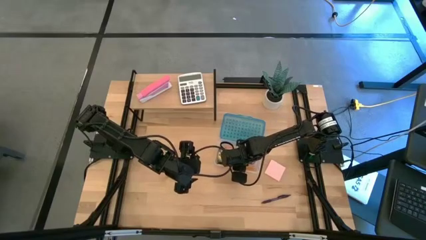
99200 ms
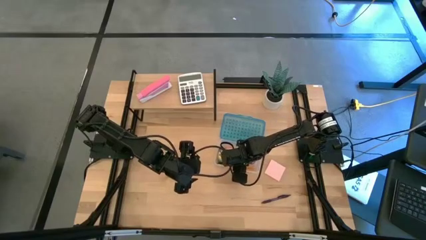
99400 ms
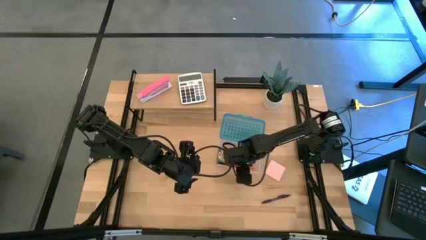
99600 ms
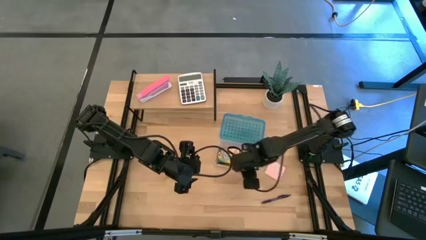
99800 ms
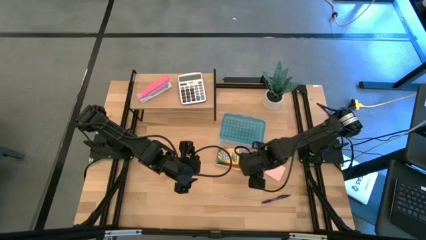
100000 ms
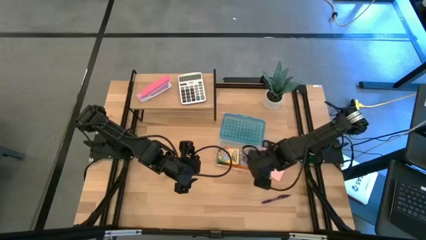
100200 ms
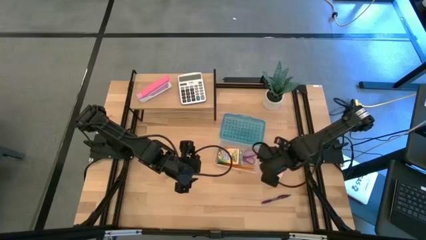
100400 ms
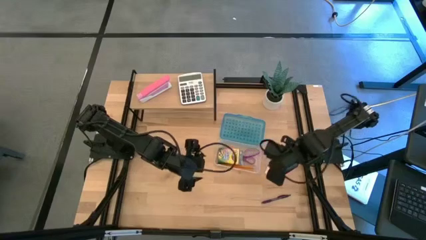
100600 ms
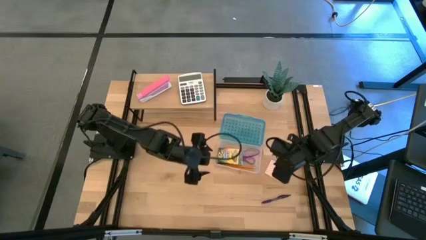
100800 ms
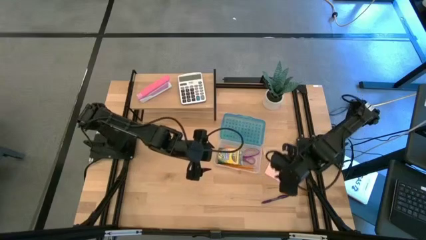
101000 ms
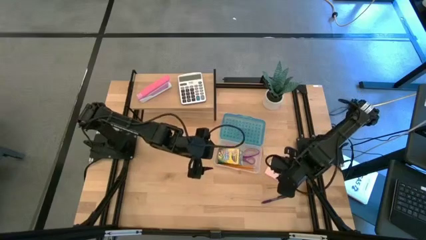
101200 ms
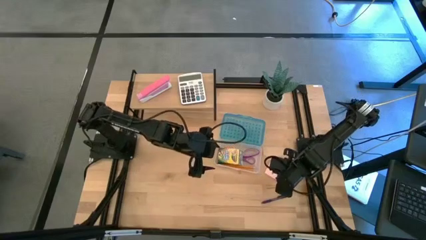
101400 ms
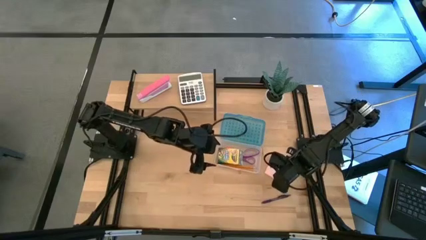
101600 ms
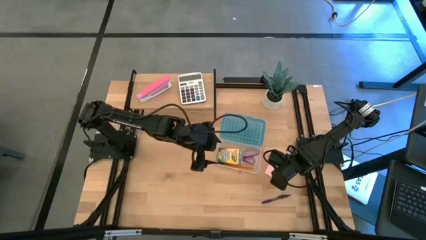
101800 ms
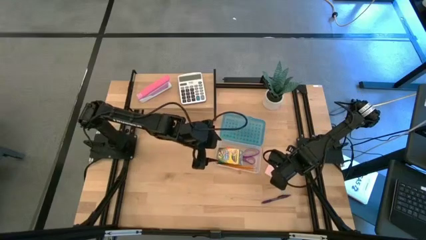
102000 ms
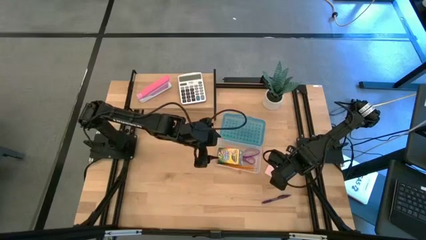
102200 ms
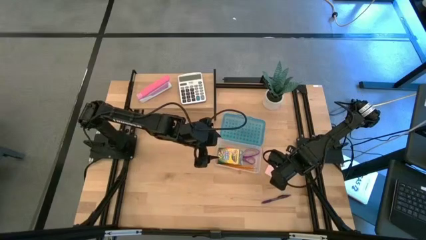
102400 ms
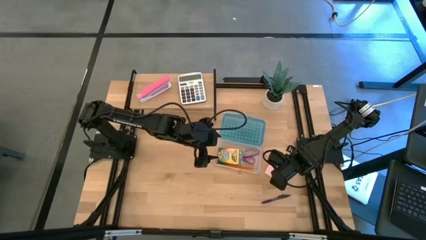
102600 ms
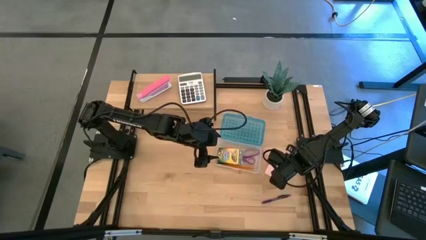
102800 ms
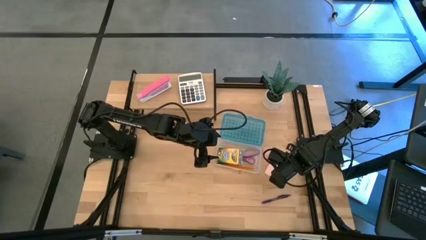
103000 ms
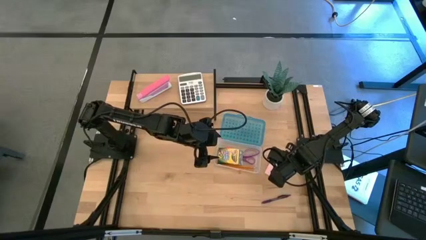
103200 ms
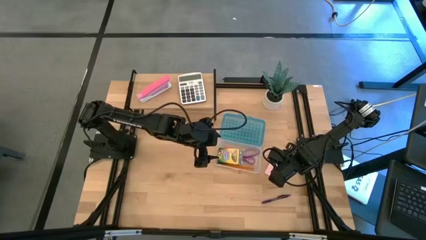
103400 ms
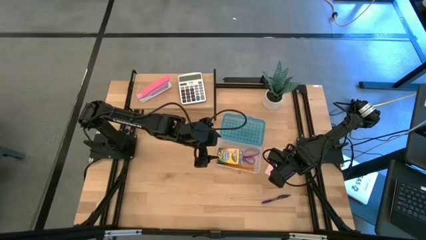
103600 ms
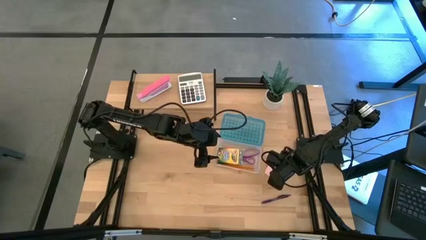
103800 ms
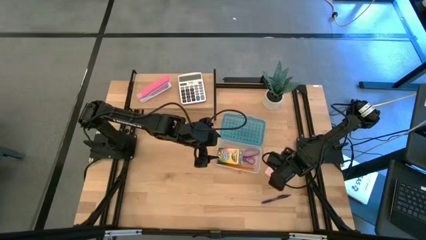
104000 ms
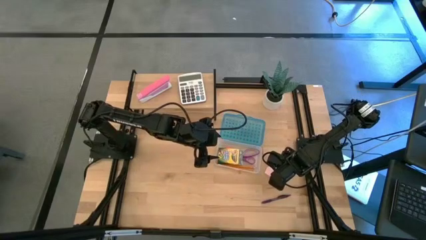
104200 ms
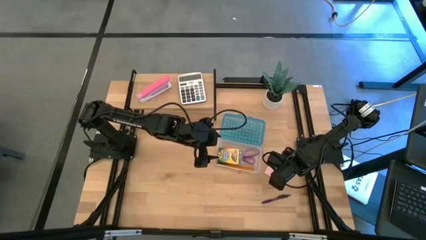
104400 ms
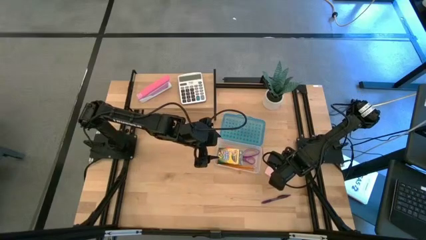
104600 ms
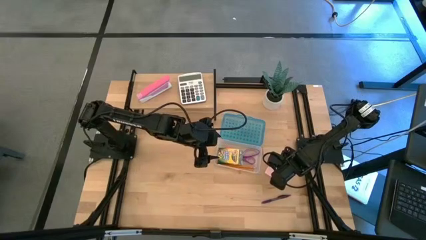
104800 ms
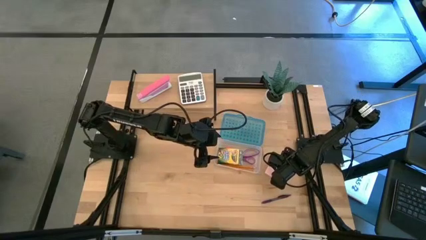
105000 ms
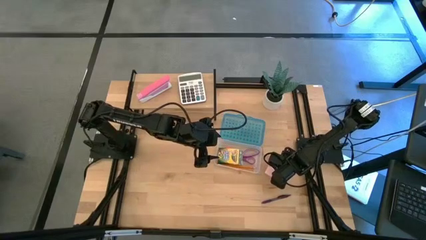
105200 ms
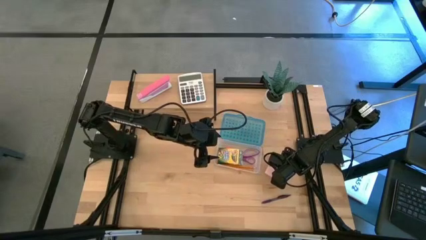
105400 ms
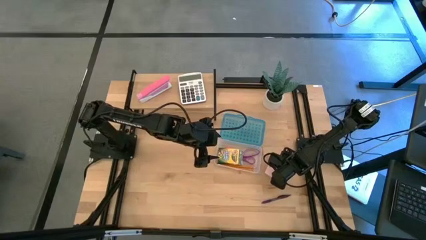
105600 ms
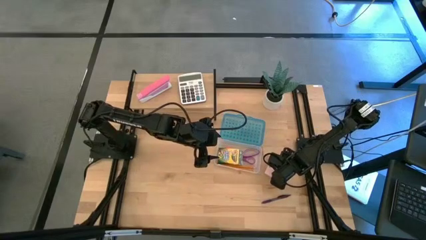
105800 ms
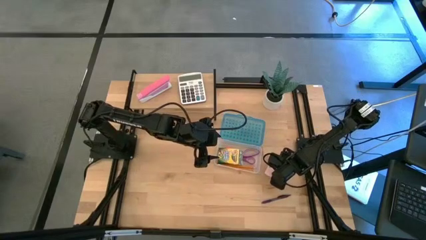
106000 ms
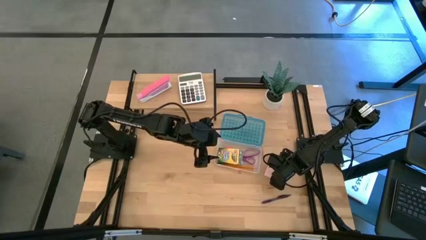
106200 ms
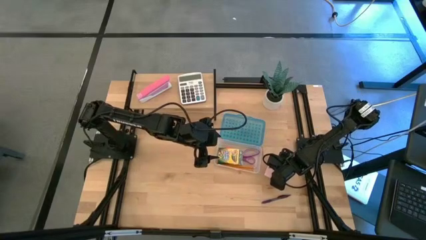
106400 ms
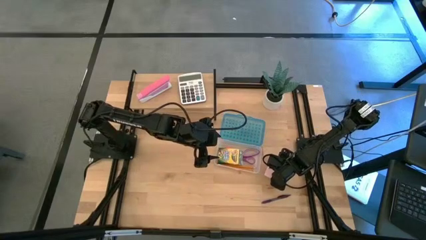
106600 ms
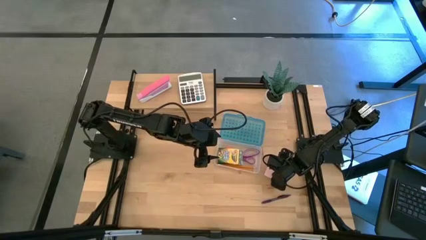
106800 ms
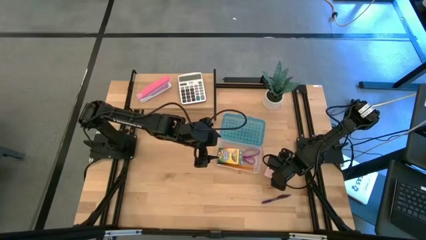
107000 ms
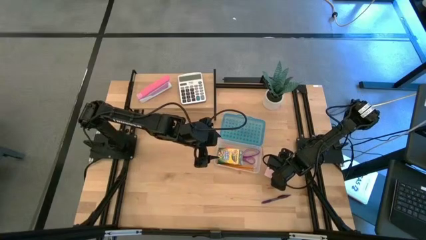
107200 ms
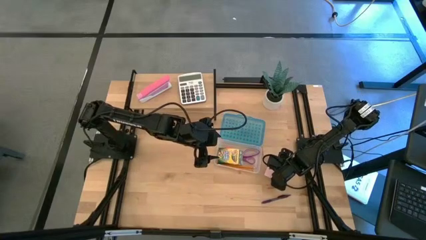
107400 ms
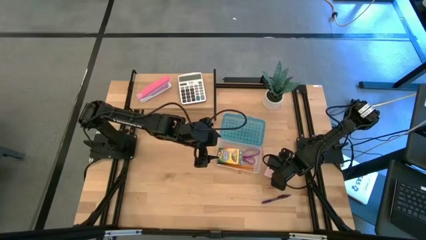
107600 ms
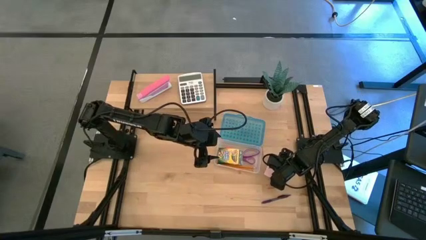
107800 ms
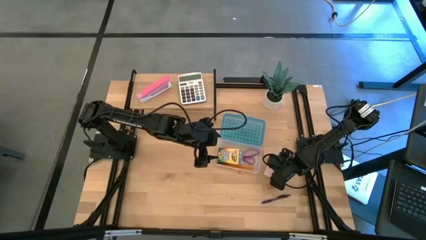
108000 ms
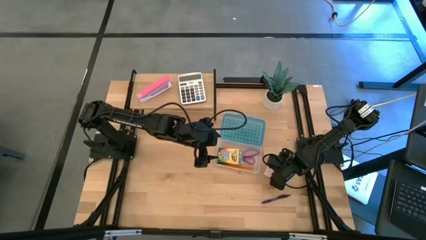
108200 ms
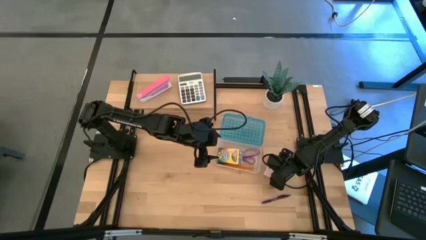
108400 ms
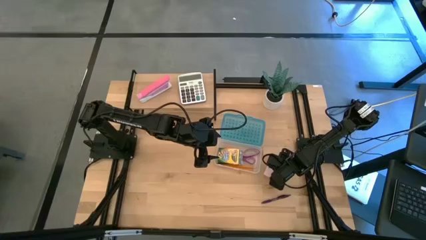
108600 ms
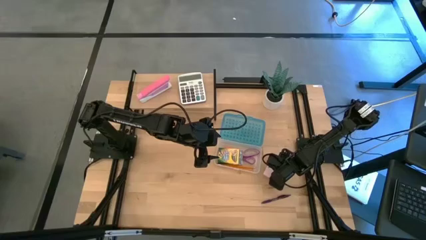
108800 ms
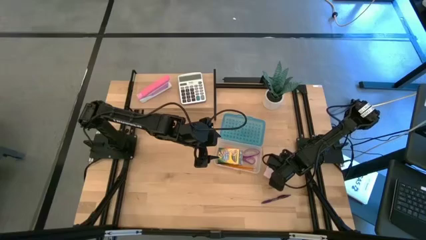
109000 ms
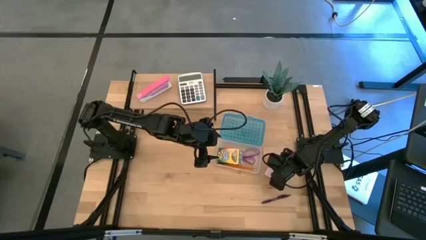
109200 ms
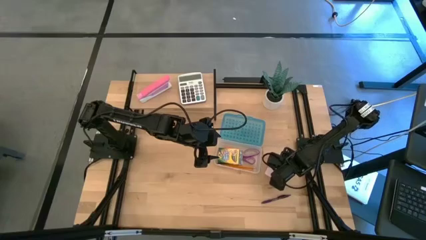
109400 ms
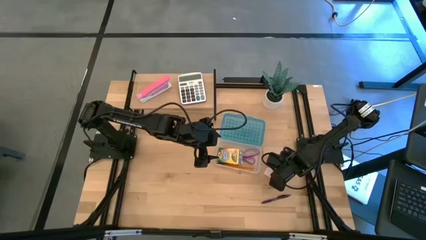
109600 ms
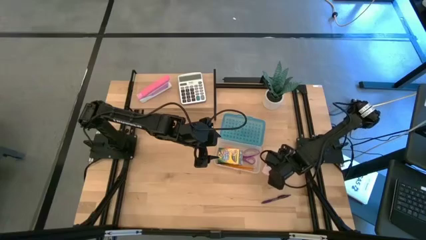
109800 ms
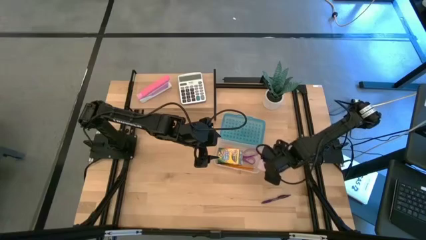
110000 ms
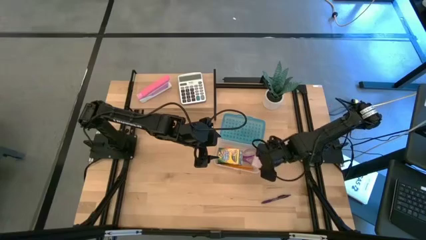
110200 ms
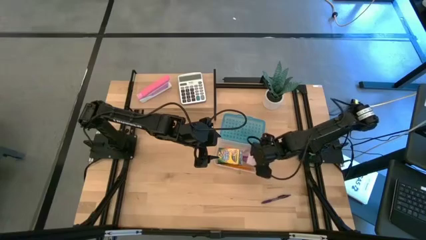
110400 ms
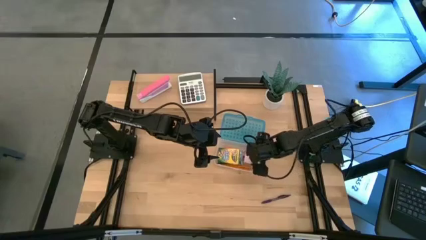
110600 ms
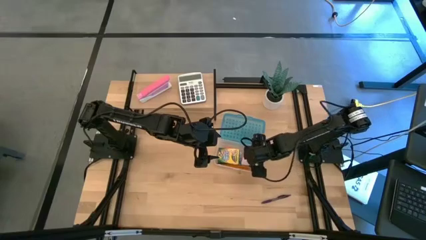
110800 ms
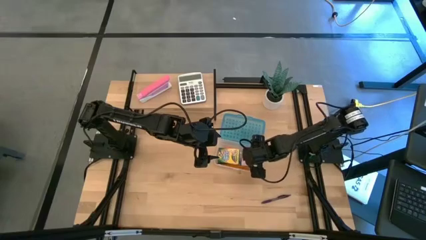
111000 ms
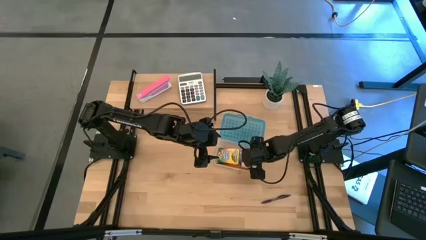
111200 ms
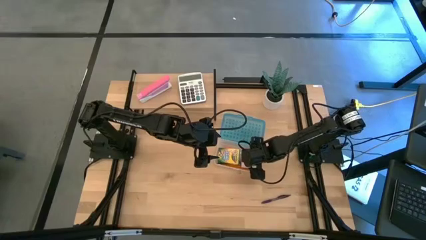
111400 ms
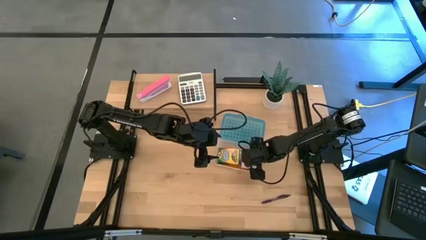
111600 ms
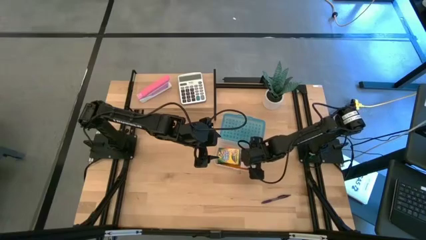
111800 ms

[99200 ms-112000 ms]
Task: Pack school essentials
Put the sticky notes into the supply box

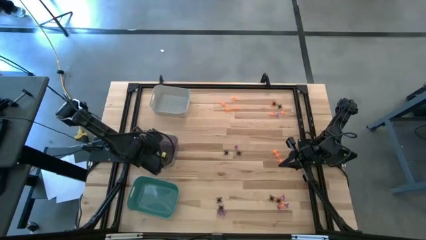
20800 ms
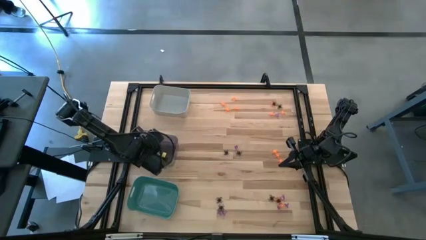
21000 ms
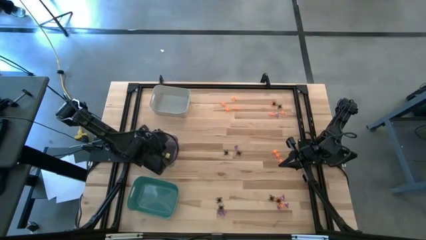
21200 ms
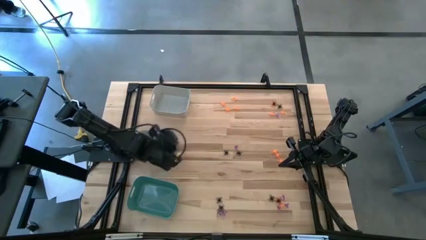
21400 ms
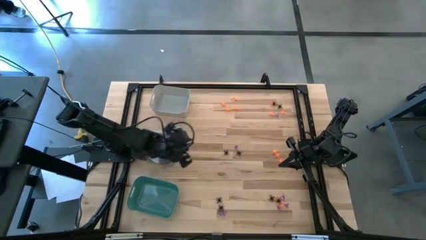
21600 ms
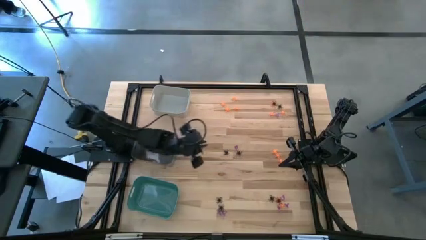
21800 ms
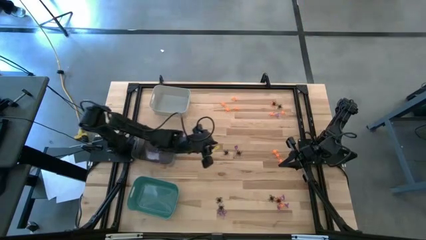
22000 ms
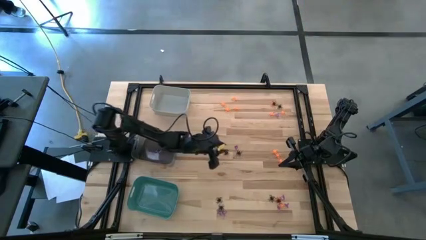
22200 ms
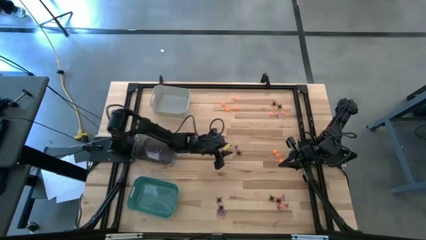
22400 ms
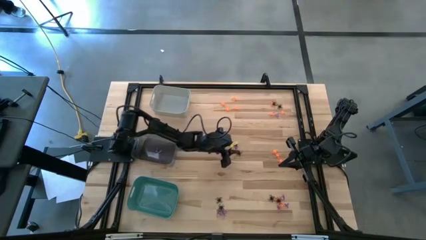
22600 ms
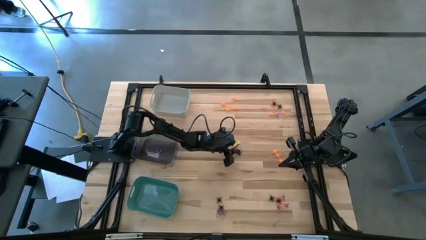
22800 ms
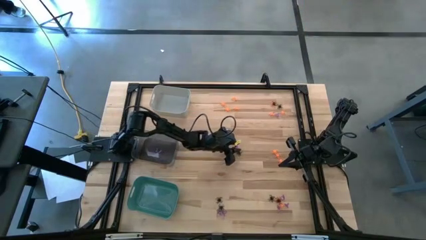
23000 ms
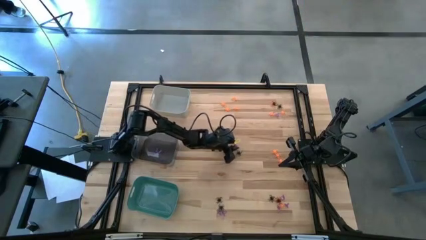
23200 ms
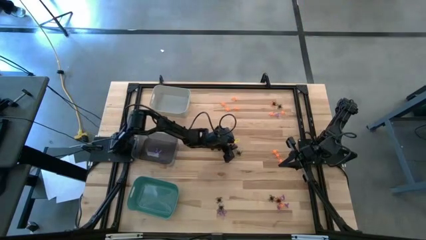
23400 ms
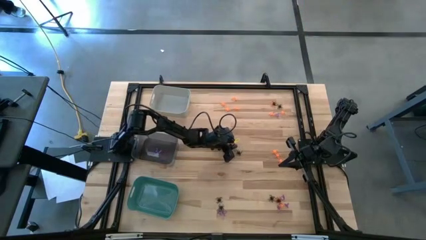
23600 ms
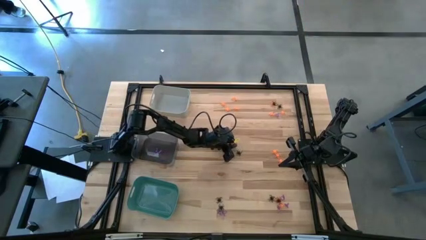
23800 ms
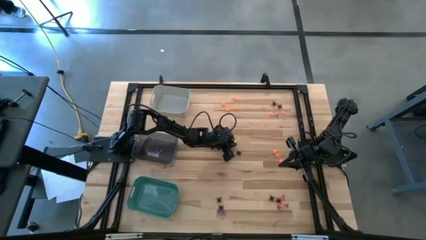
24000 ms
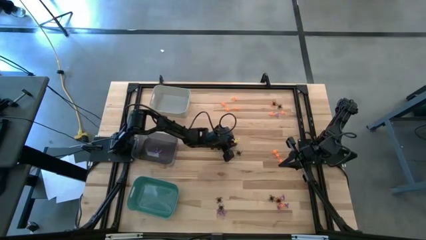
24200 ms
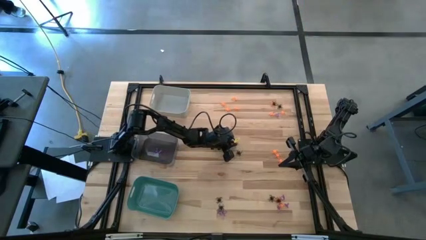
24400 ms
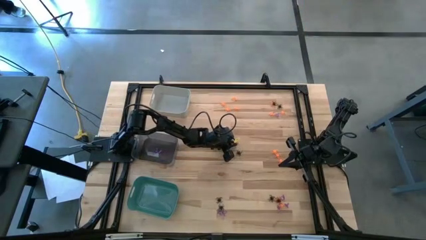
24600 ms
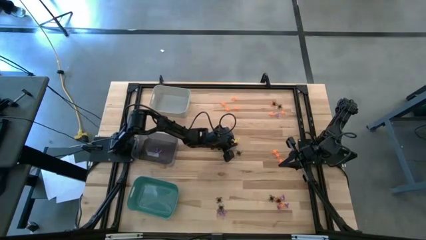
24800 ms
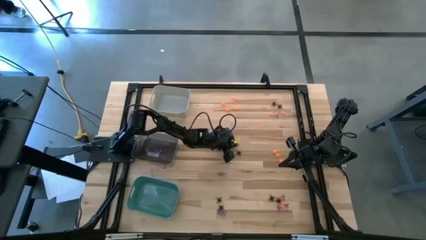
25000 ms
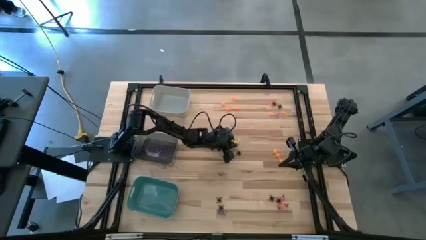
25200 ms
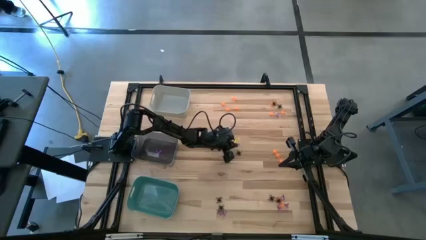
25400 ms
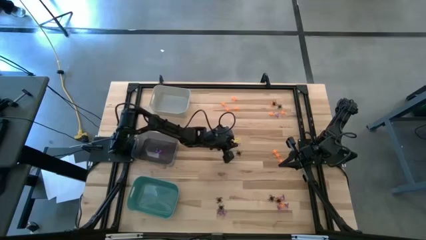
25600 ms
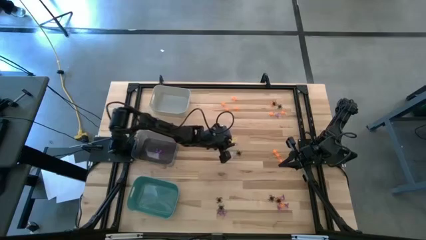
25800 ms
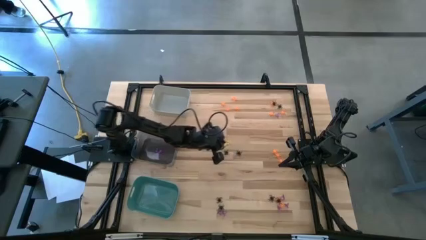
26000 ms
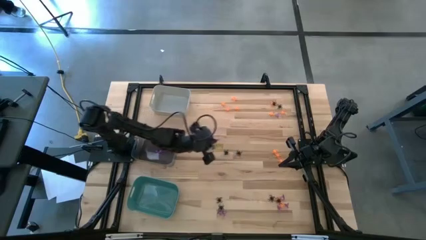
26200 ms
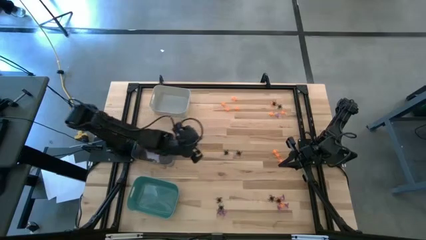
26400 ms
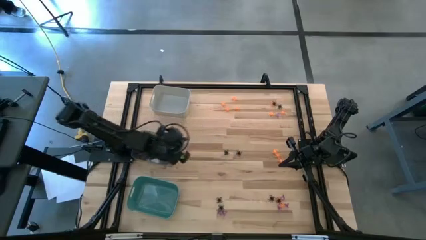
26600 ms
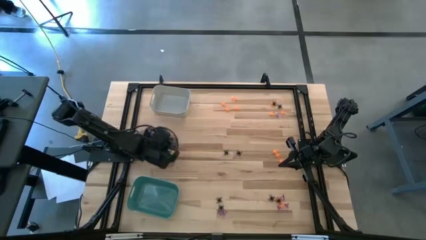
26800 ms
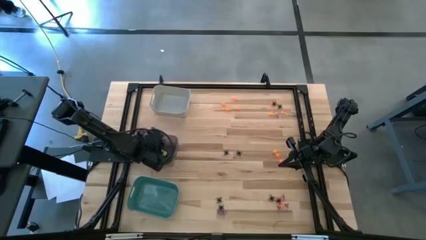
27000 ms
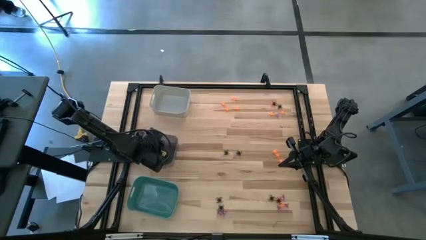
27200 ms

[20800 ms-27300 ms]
Task: Sort Halloween decoration
Put the center violet witch hat into the black bin
